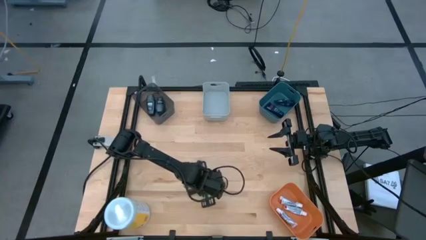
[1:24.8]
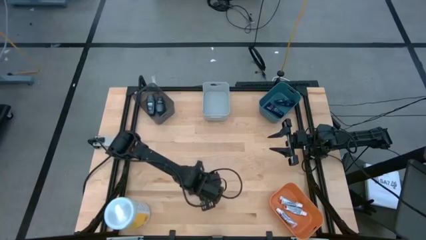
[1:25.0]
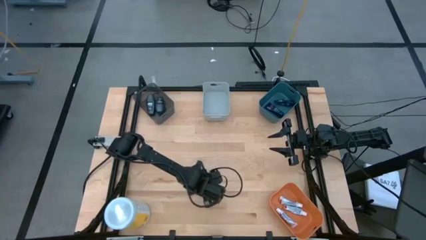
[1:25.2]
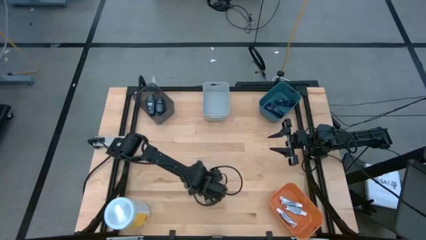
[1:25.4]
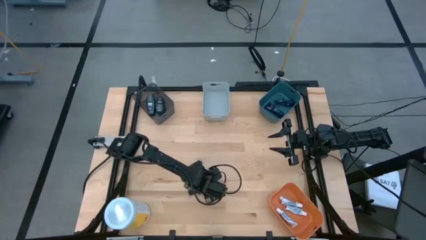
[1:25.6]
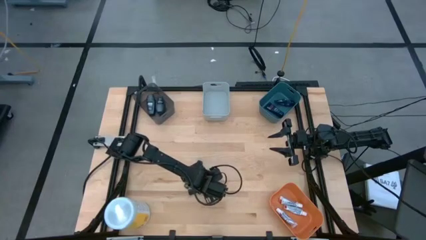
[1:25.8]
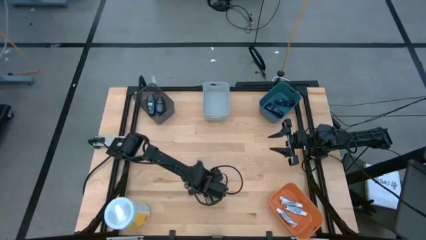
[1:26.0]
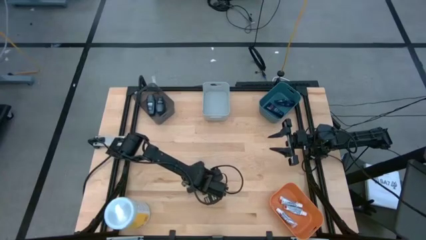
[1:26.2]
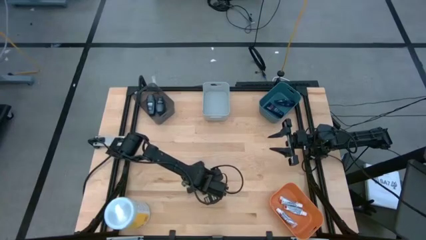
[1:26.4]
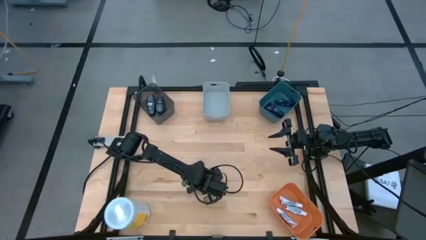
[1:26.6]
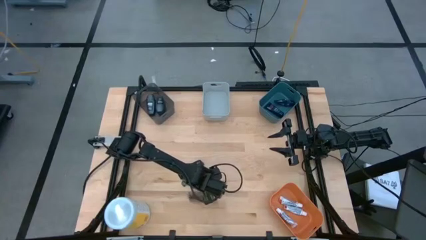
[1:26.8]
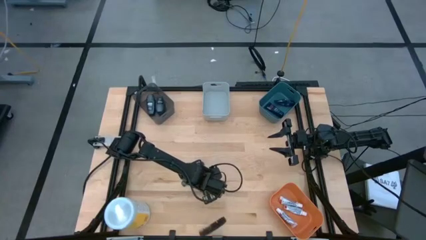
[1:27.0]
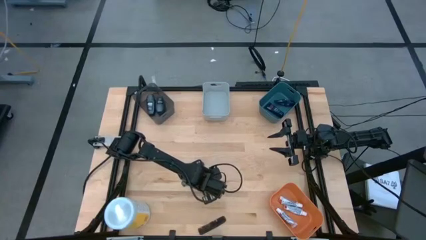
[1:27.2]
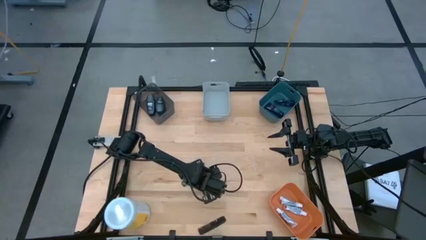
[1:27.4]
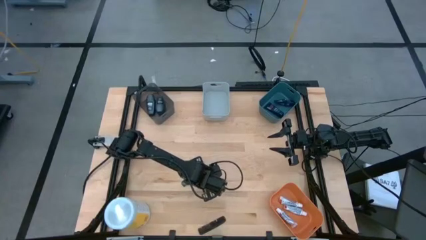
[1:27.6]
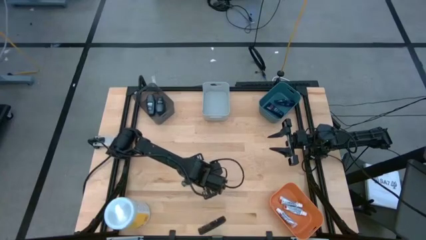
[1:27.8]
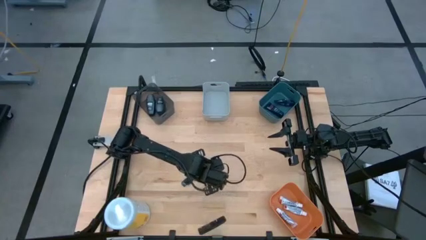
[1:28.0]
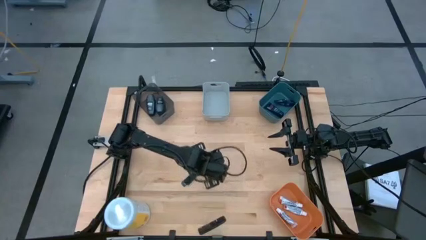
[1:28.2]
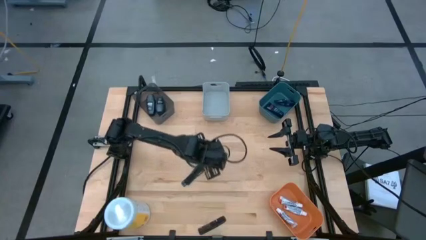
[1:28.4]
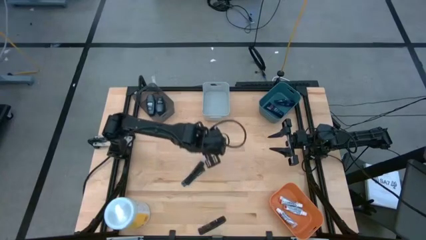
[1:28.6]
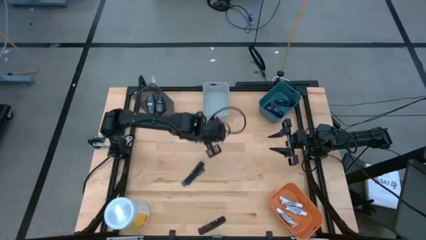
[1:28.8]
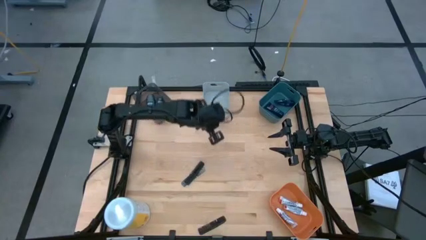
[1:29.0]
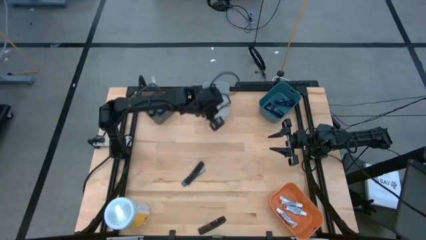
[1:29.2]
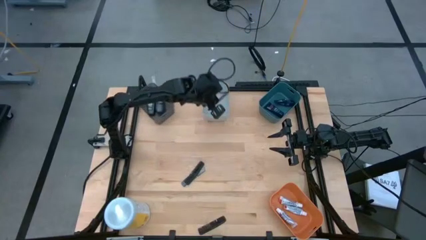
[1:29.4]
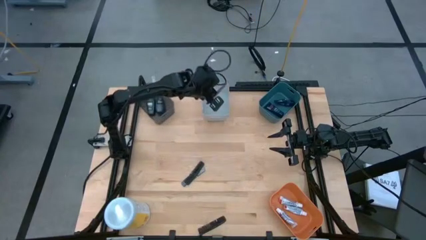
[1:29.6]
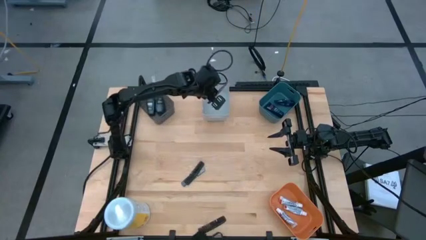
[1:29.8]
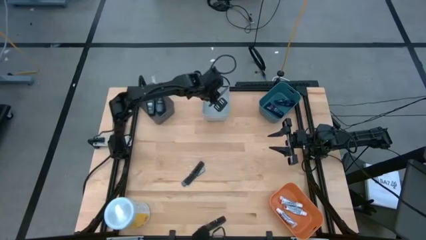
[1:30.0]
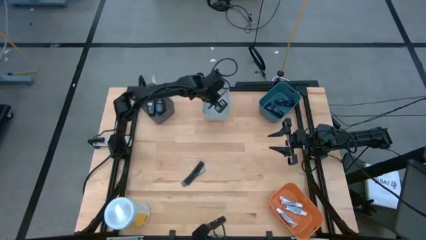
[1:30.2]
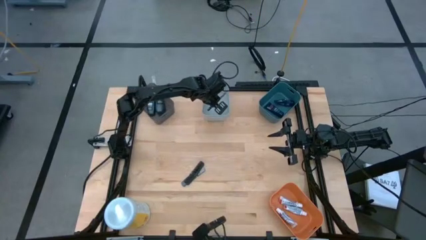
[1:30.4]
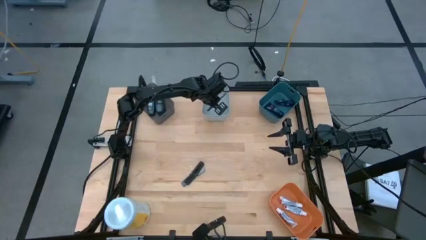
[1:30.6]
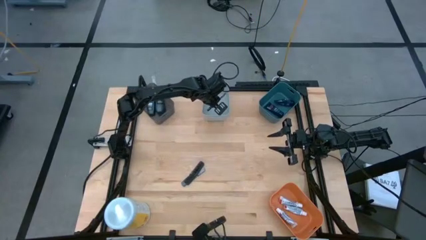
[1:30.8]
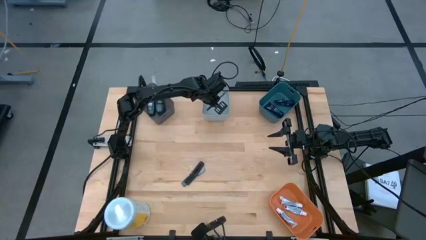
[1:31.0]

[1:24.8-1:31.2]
Task: Pick & Place Travel size toiletries
Put the black comb into the gray bin

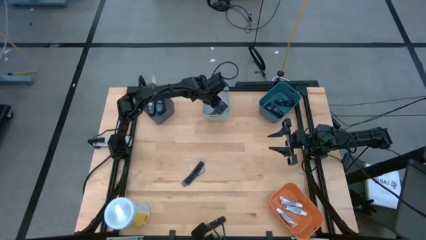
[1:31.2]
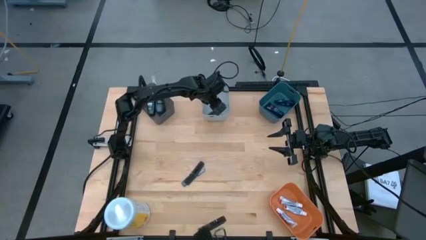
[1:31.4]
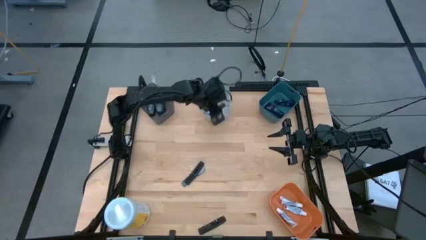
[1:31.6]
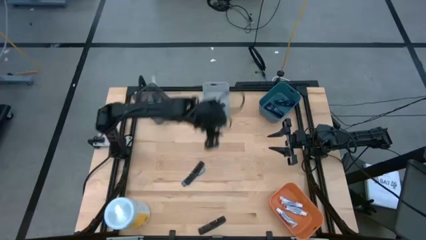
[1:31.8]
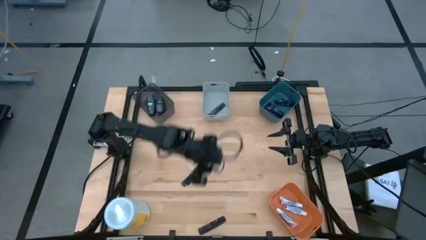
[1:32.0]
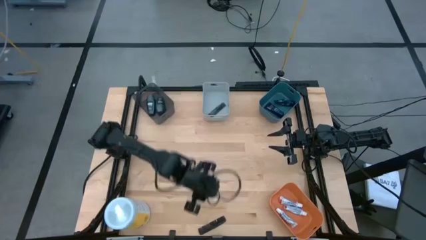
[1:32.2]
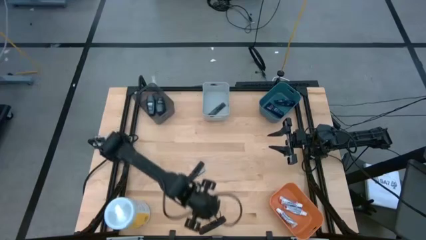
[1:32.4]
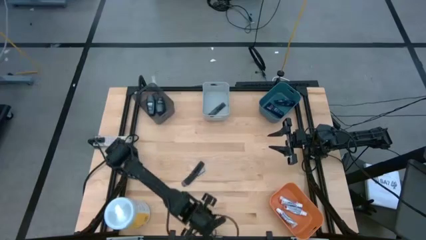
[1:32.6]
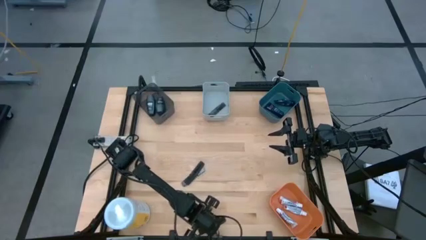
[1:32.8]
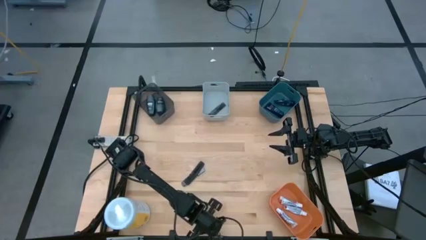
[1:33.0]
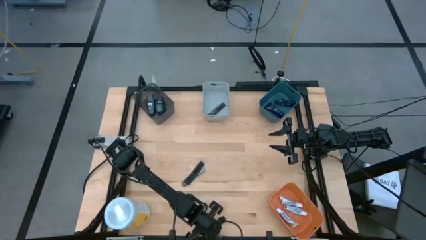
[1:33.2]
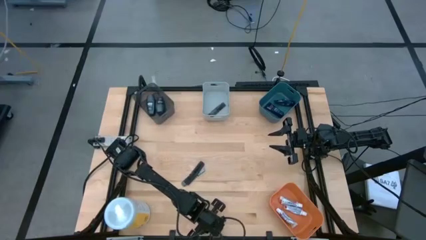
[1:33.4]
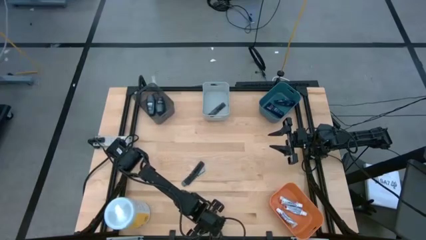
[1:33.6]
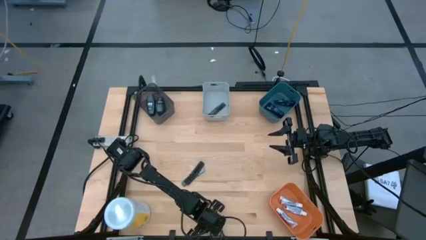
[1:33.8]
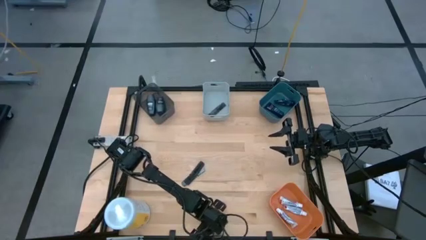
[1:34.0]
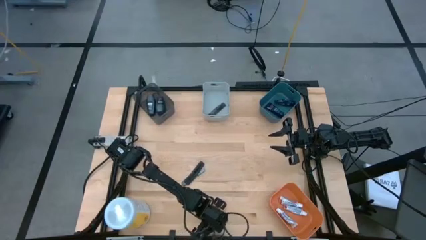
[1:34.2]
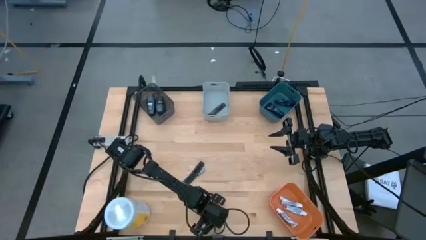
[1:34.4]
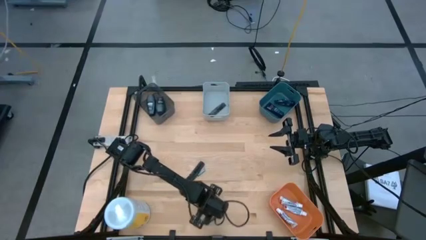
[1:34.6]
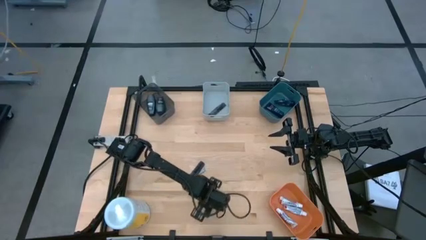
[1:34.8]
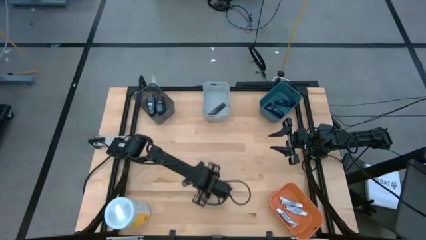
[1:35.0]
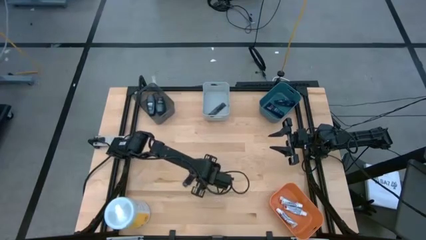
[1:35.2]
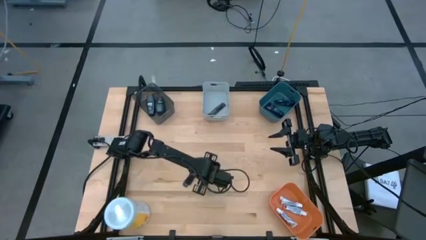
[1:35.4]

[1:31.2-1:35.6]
Move the black comb to the middle of the table

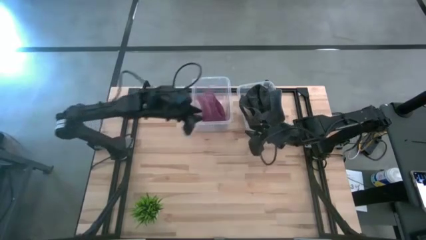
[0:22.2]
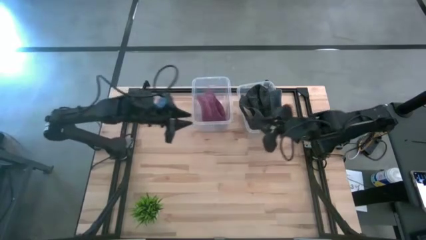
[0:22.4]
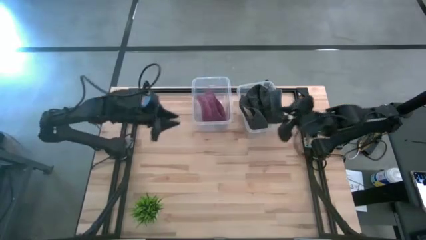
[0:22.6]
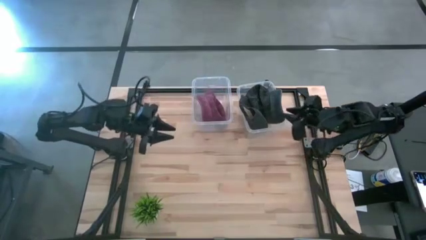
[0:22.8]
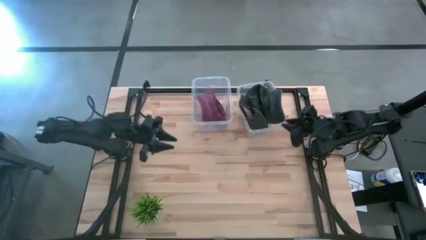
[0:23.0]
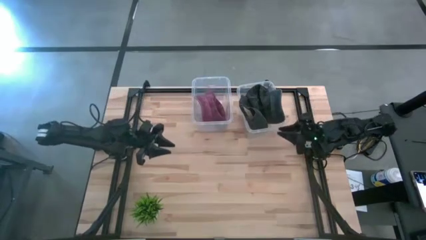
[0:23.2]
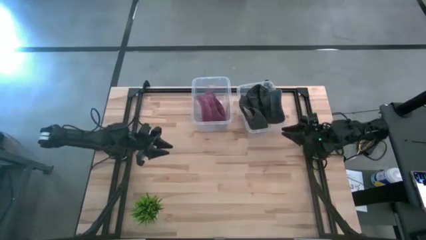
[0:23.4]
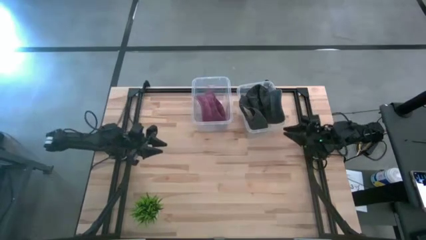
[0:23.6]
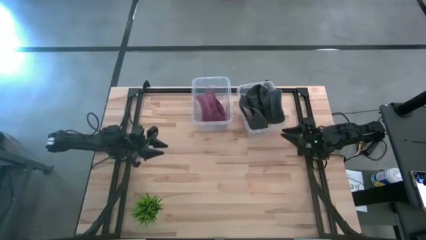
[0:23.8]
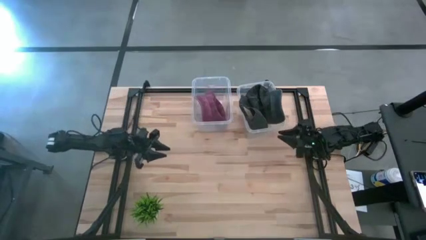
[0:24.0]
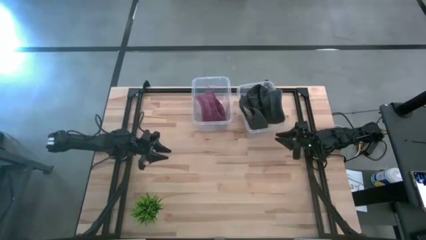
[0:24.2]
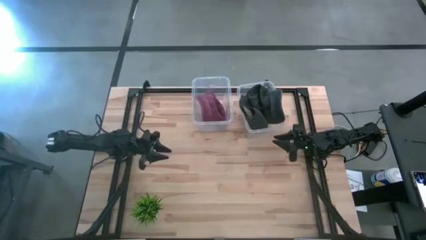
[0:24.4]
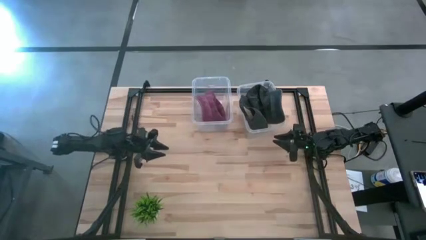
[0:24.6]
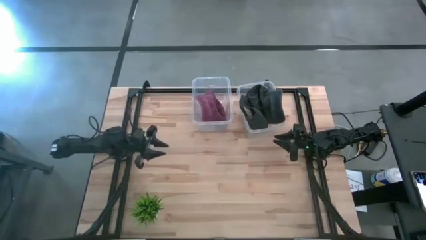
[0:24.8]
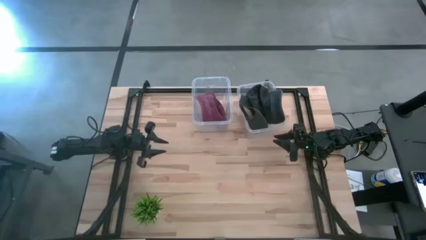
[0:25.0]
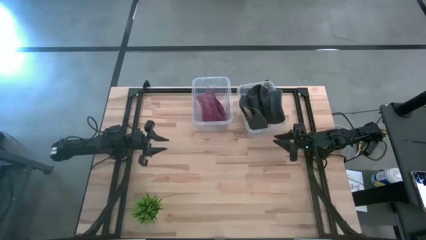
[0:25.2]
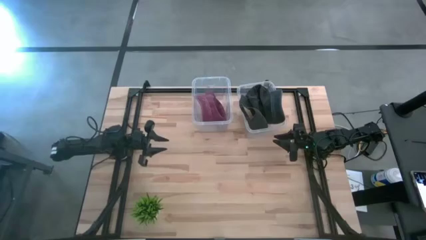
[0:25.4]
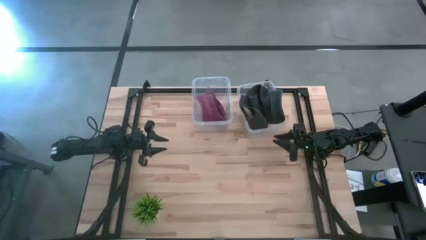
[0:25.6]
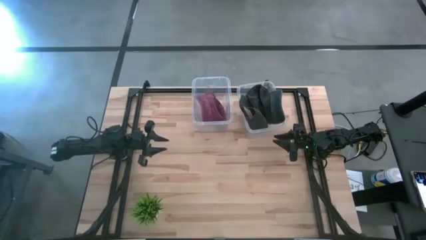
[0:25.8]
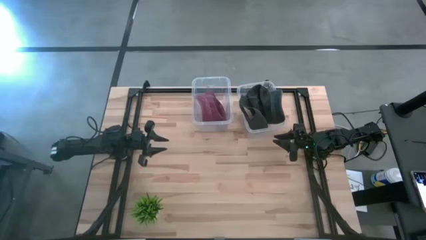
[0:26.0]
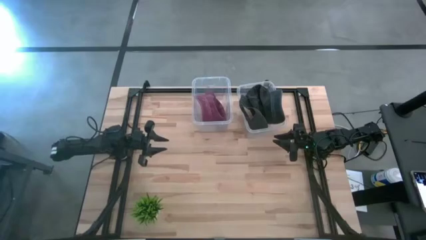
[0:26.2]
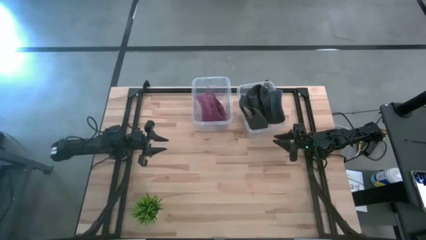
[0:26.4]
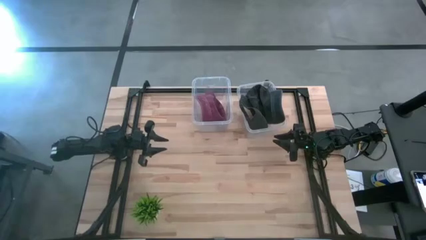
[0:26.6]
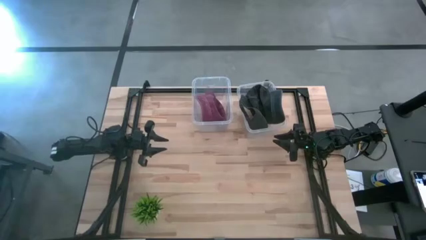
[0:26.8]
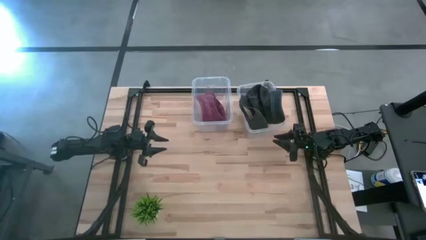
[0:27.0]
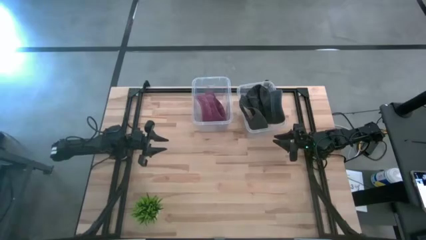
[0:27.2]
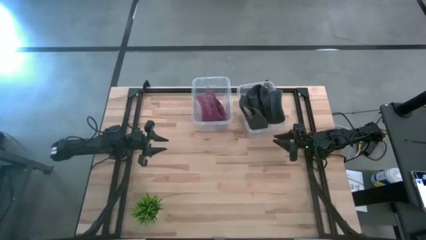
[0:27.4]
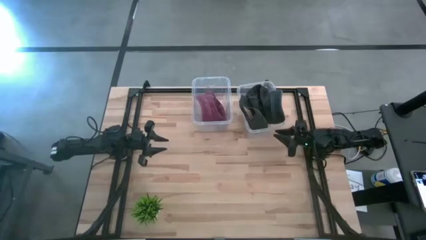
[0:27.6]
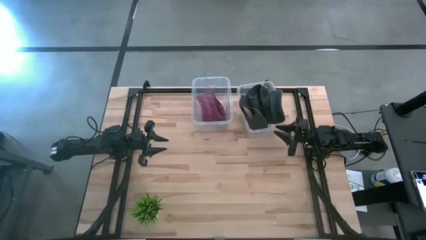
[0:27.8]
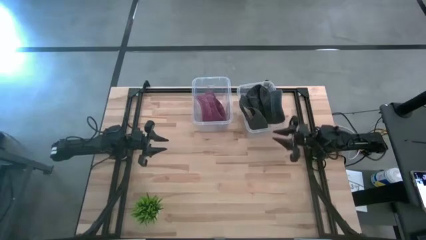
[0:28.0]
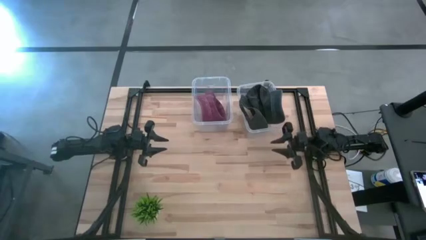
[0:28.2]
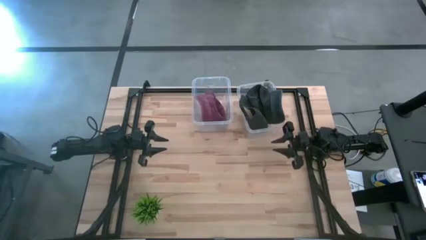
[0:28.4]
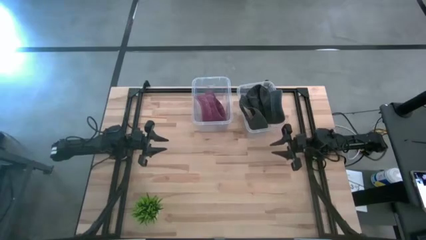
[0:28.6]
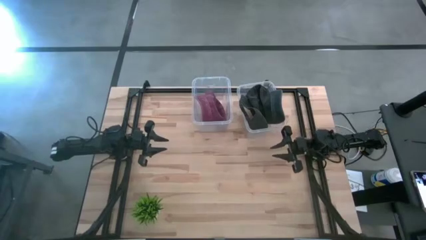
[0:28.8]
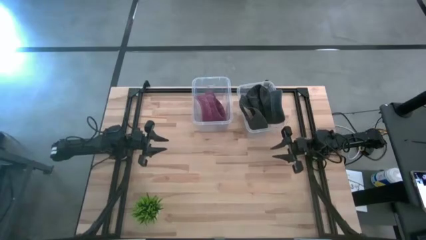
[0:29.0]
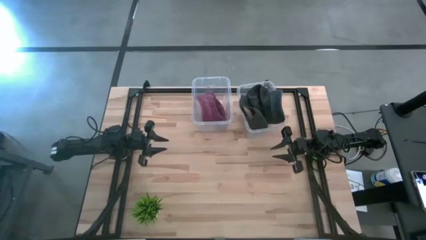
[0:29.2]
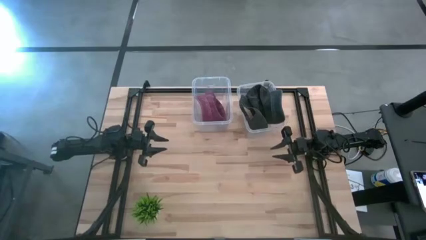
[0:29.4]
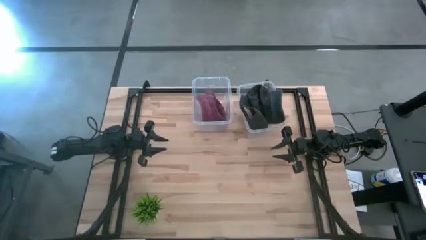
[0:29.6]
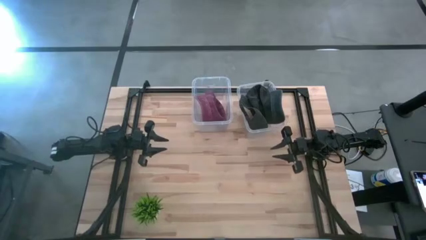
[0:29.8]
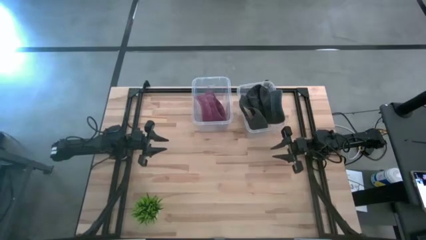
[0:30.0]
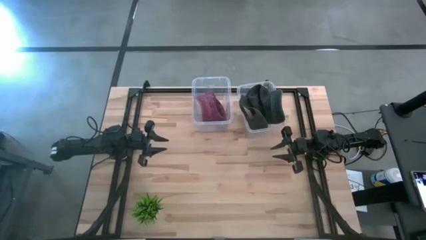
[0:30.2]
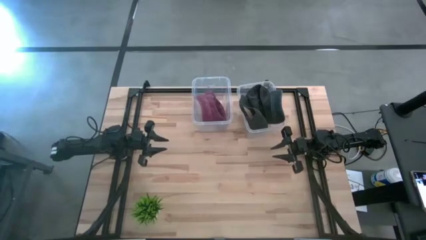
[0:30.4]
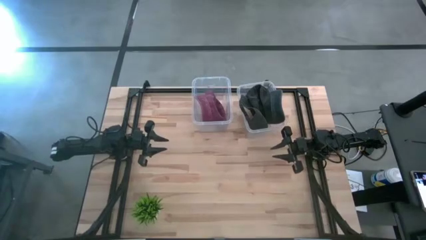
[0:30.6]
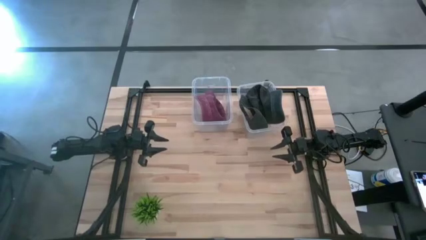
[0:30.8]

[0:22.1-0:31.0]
Task: Pick & Place hat
Return to Home Position
